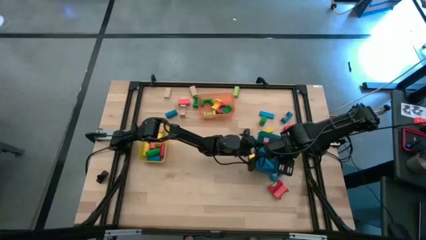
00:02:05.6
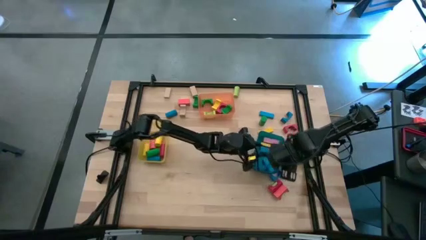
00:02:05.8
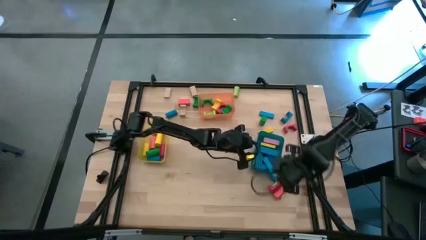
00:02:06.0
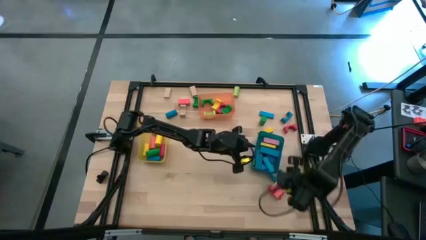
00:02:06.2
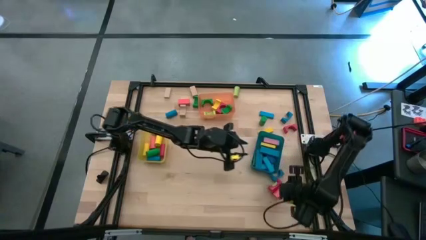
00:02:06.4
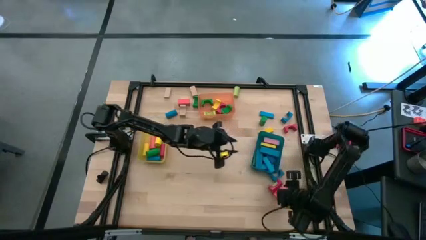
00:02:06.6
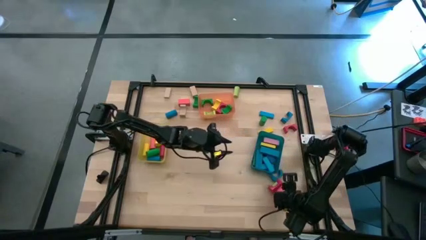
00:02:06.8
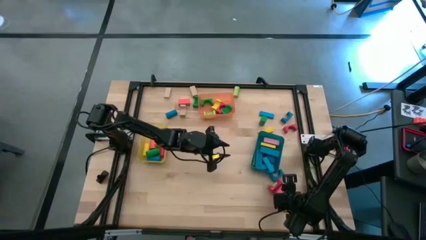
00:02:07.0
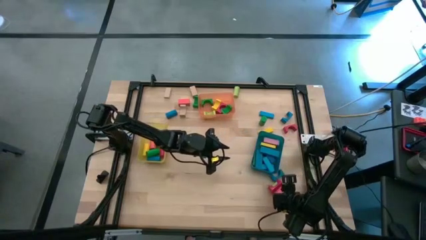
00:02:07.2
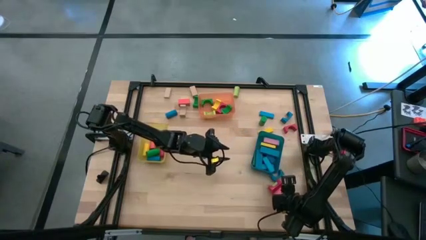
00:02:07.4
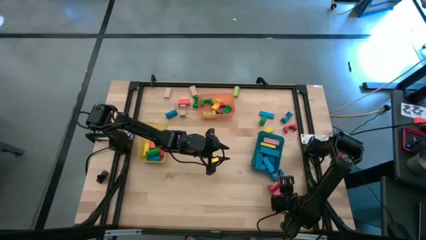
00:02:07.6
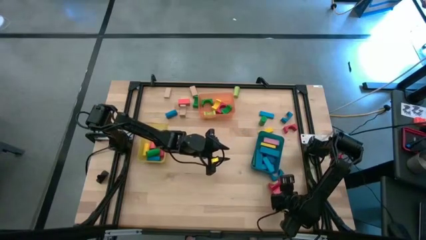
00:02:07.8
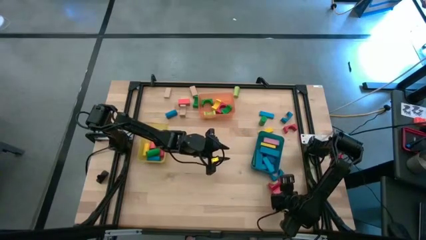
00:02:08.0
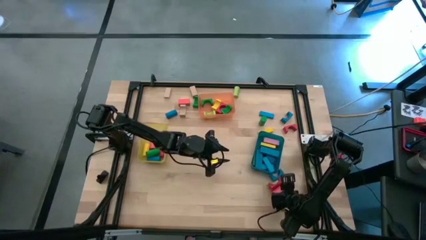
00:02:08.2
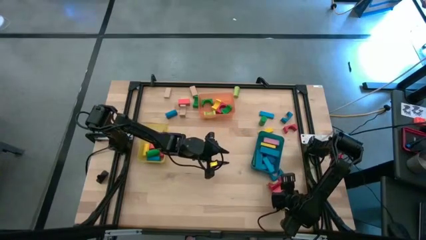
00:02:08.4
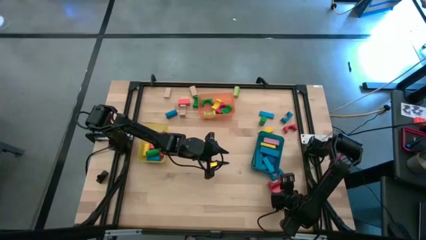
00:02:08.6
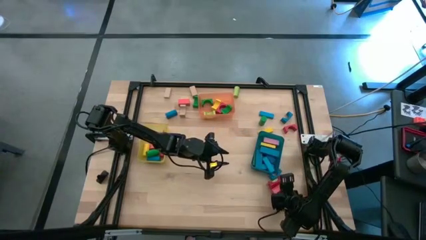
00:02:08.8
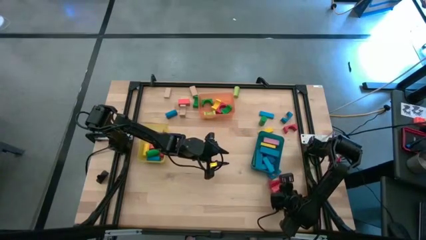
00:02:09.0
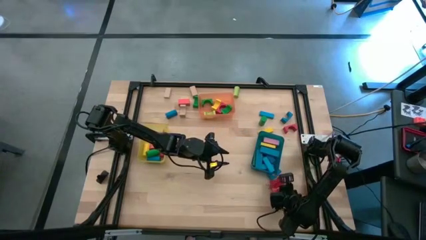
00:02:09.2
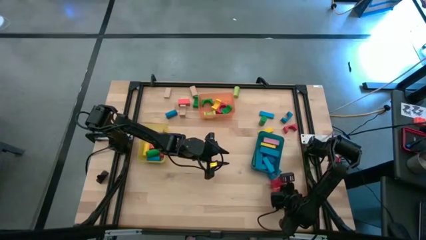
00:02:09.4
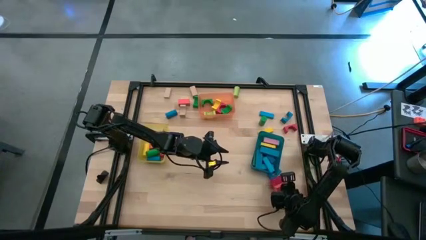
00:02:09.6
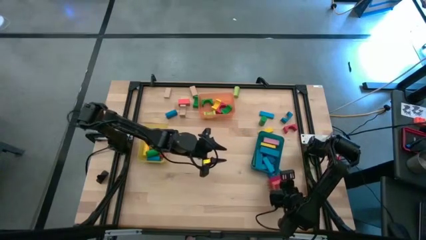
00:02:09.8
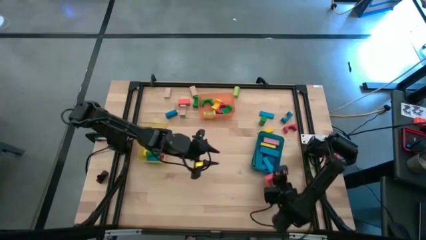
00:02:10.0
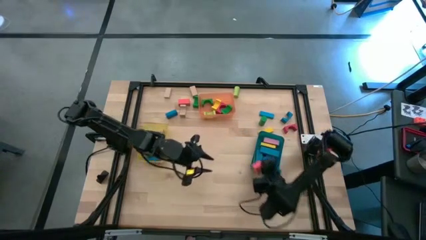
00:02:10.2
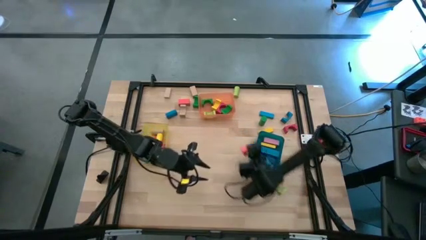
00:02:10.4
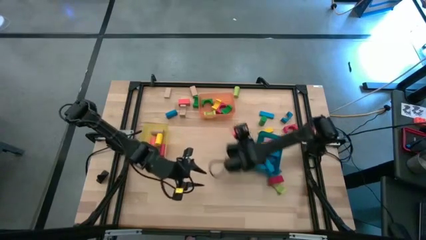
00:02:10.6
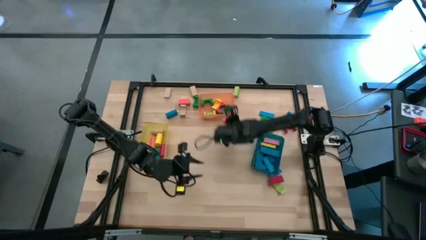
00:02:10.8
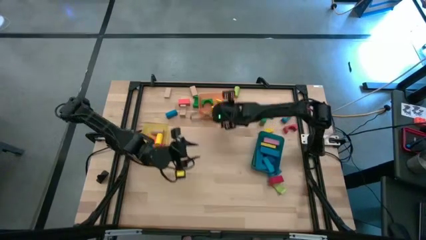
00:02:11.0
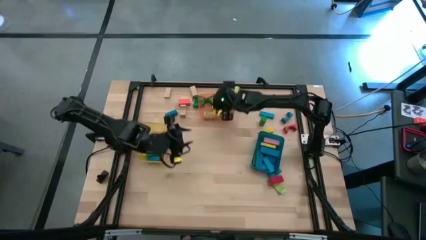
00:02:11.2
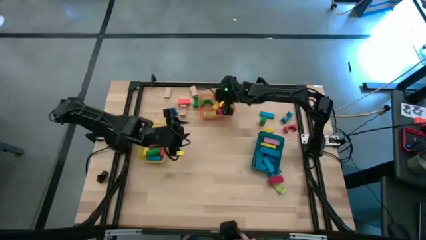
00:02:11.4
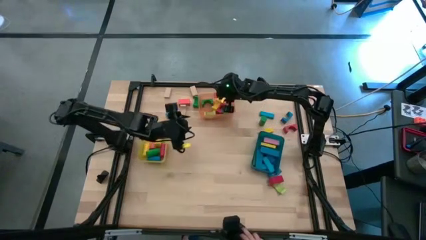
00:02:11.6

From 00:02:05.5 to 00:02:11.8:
Task: Sort blocks by size
Put the orange arch block into the orange bin

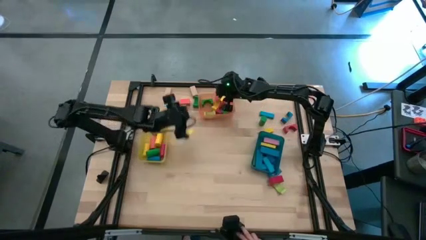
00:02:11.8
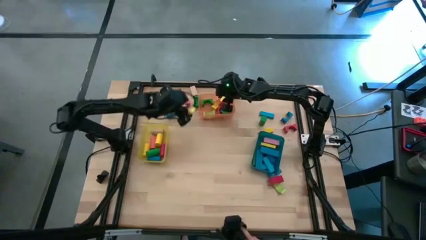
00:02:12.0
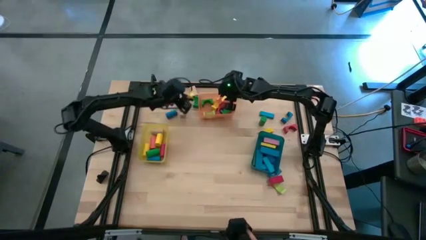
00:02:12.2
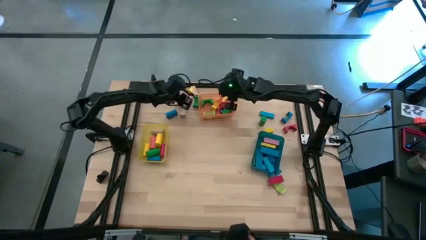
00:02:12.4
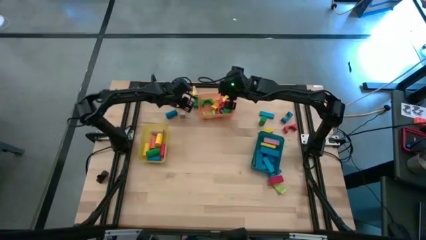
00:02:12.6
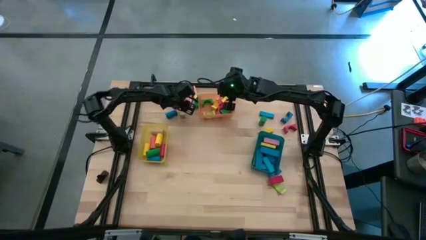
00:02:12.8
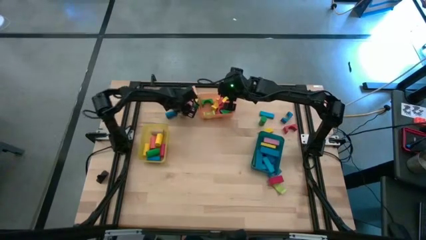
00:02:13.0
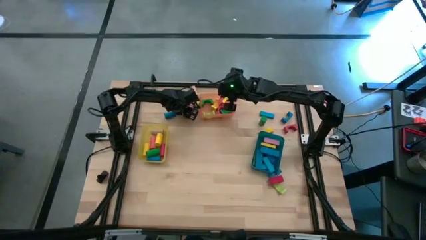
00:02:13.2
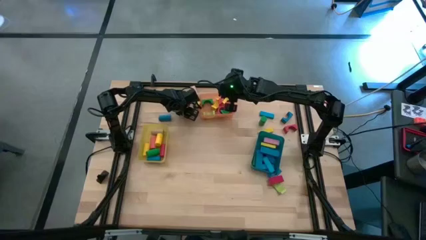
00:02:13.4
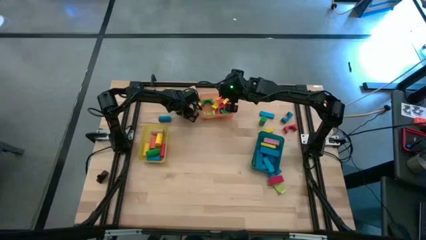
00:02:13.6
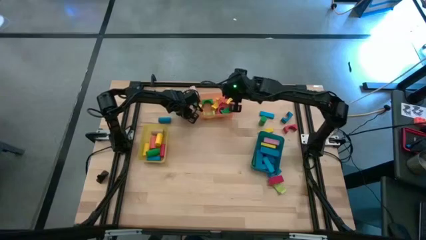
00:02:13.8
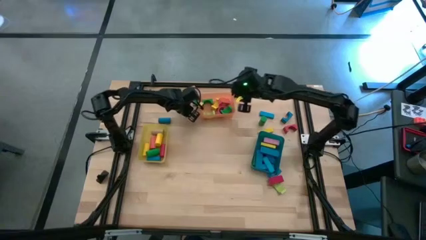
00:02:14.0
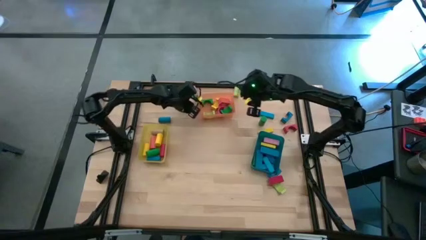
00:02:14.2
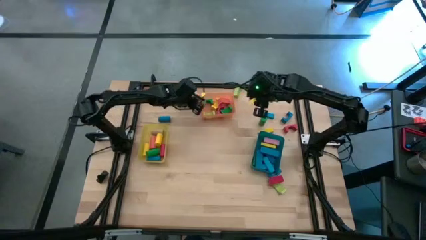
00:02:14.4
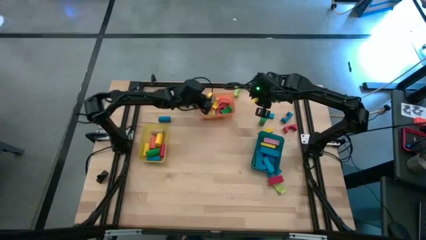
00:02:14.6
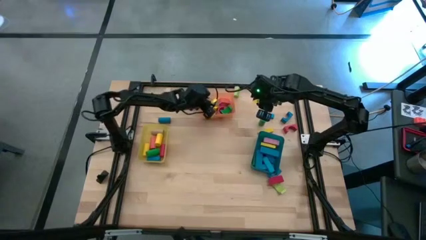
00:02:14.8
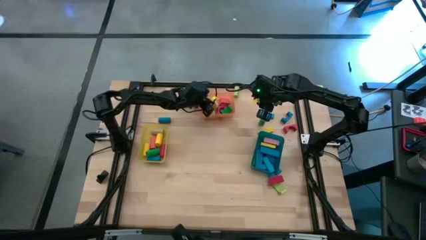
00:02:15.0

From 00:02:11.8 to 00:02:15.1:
Put the brown arch block into the orange bin

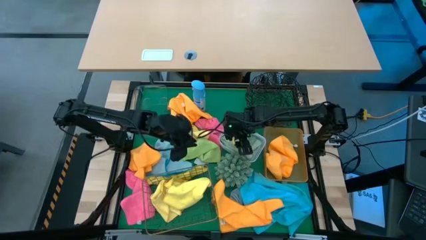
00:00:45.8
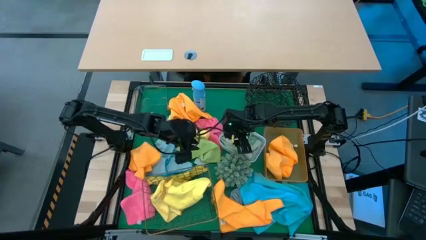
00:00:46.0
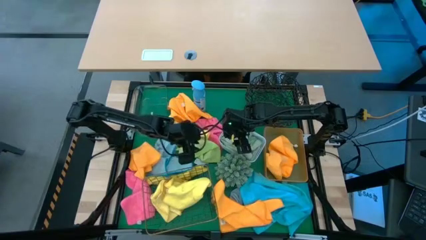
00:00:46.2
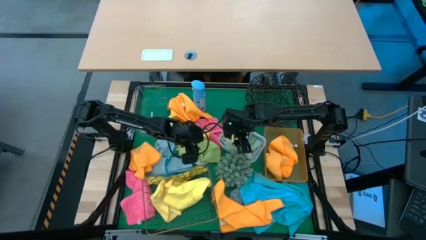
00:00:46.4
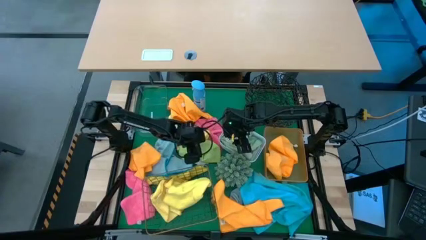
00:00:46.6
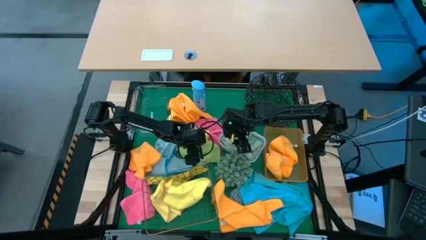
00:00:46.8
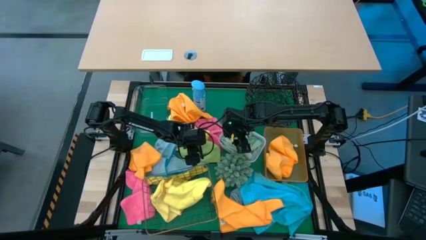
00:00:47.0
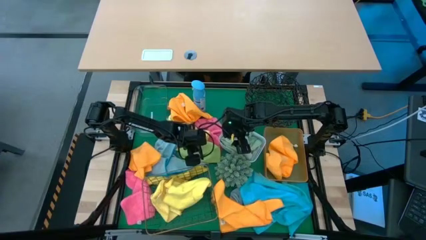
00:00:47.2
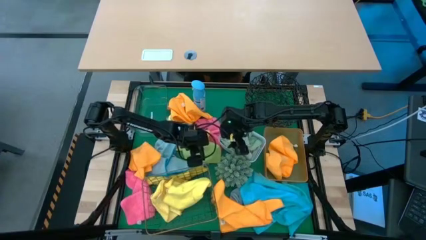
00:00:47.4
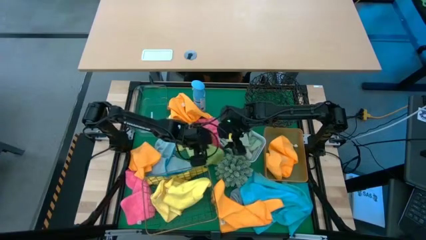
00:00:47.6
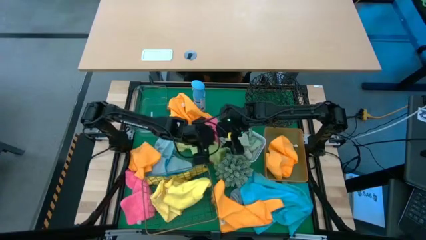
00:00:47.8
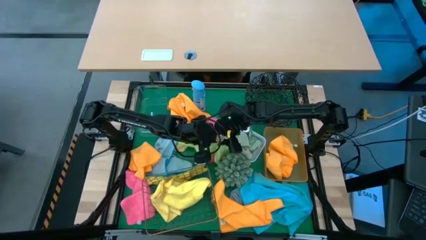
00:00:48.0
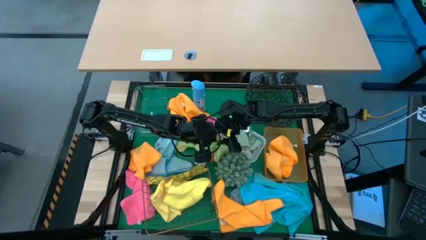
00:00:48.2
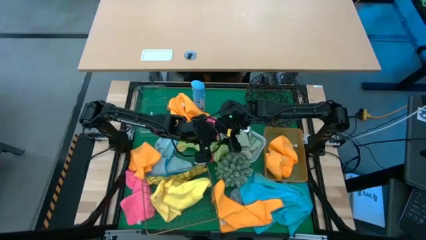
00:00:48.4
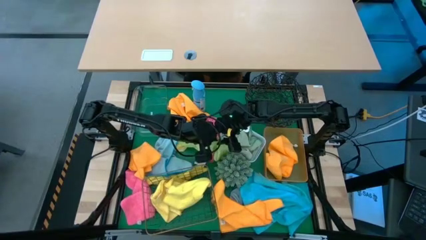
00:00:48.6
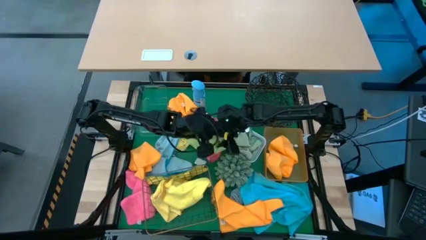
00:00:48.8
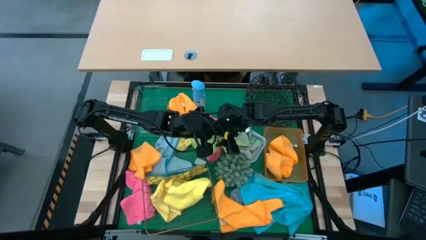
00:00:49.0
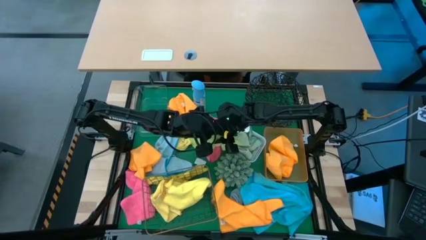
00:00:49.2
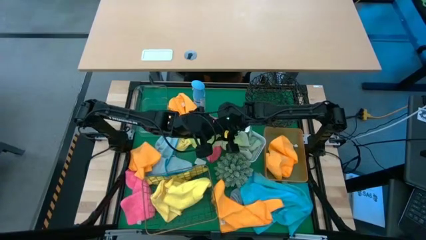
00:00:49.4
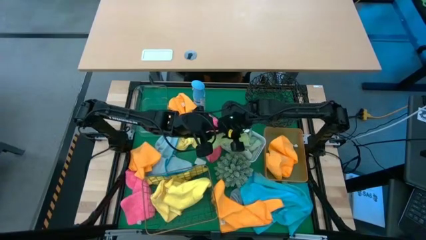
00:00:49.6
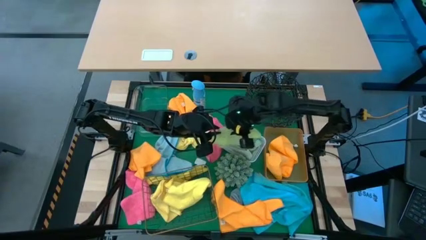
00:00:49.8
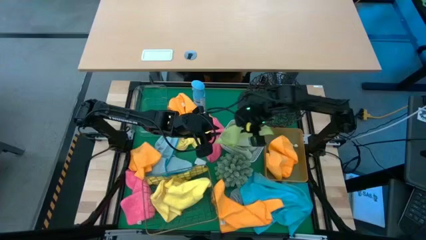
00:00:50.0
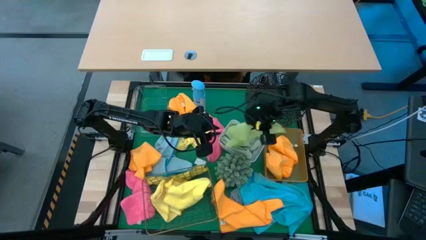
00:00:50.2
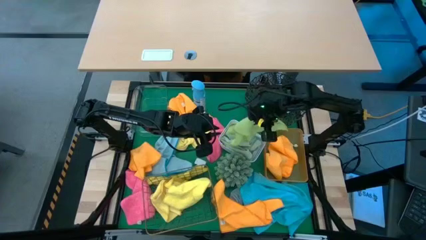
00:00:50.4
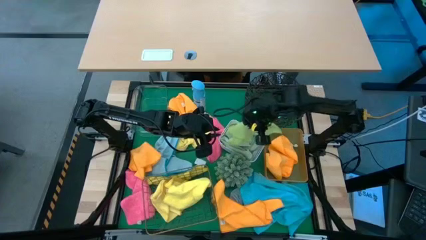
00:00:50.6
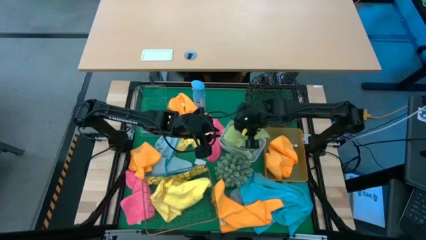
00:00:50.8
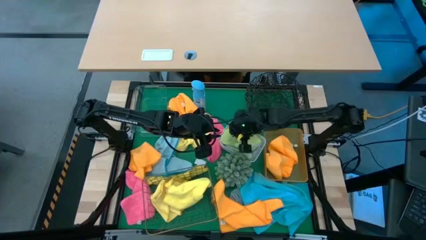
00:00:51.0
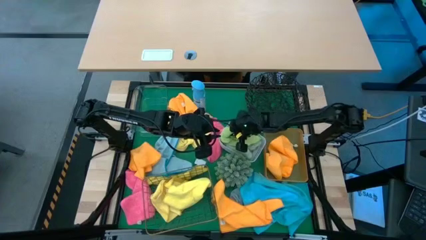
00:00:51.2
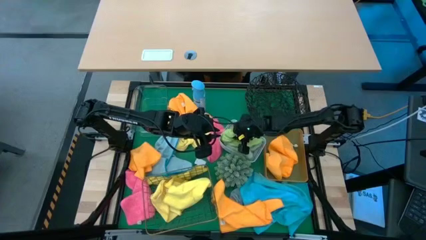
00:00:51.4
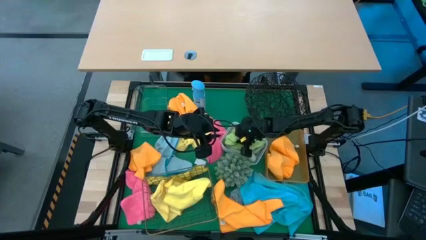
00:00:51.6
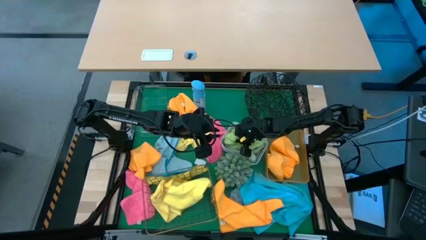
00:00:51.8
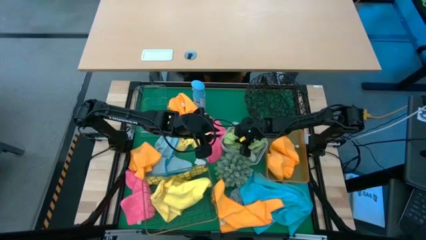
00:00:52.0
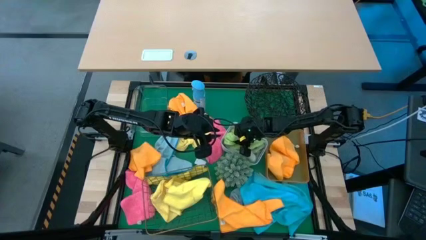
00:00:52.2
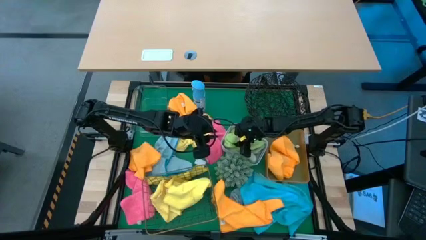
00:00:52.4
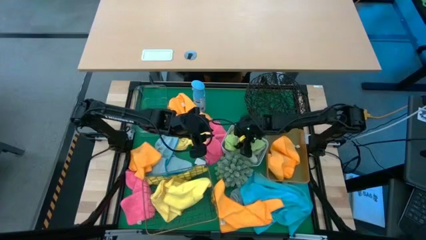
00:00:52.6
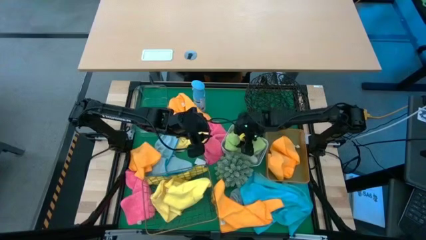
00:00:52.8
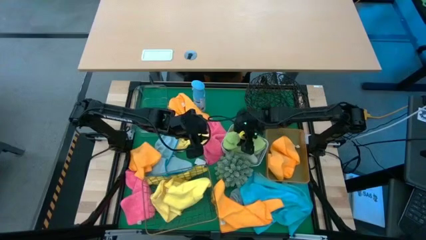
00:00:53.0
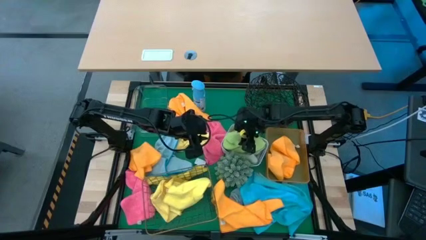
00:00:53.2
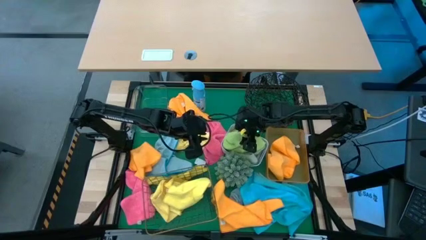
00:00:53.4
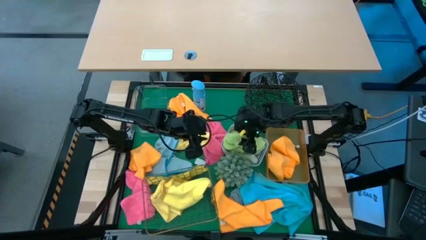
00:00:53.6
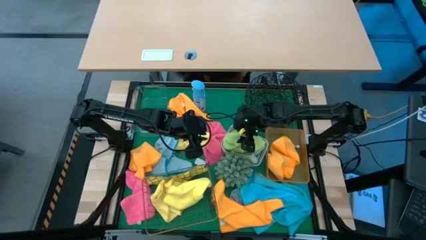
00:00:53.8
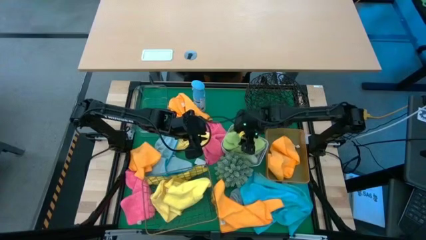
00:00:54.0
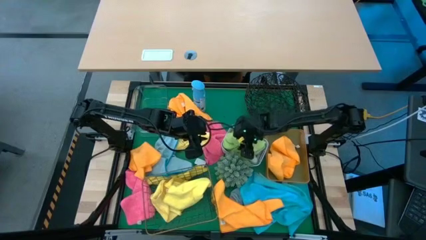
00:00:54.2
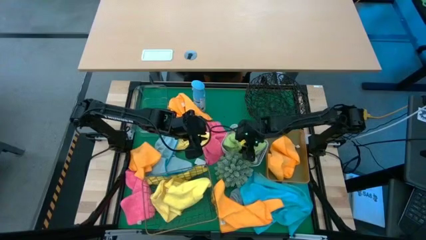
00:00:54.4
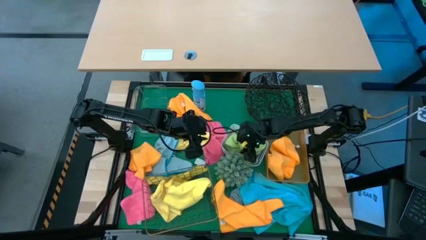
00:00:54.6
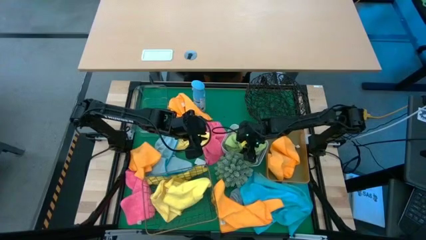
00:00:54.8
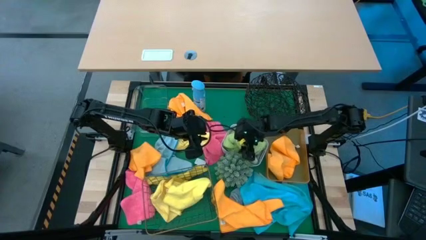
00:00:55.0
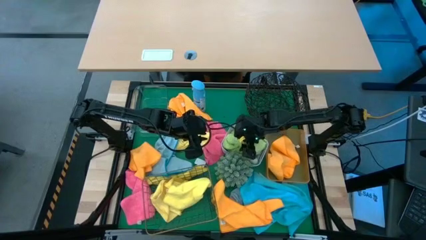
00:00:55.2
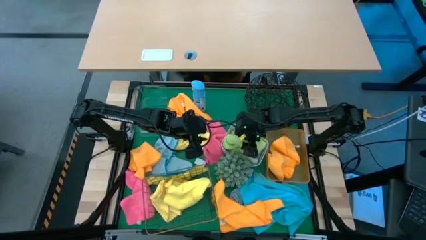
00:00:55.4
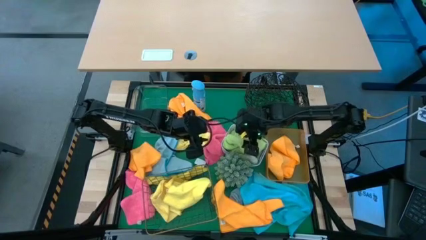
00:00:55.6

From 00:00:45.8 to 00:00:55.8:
Task: Sort microfiber towel by color & place in baskets
Put the green microfiber cloth into the white bin
